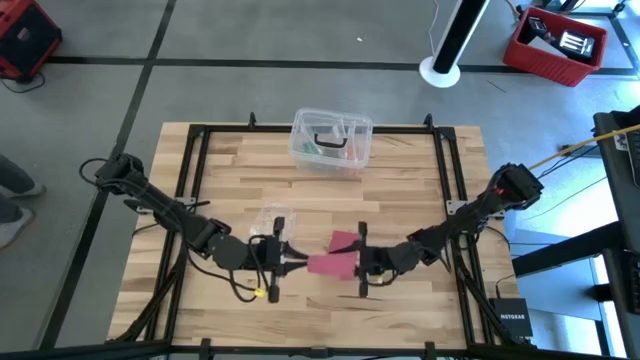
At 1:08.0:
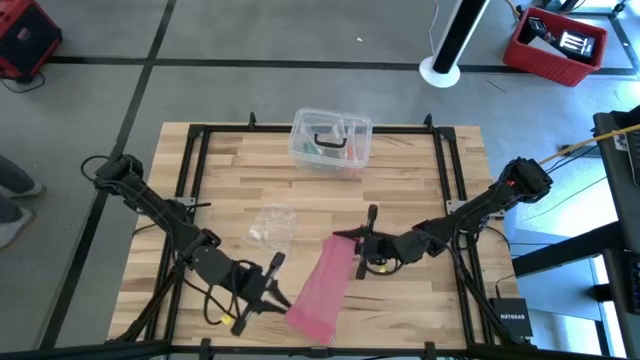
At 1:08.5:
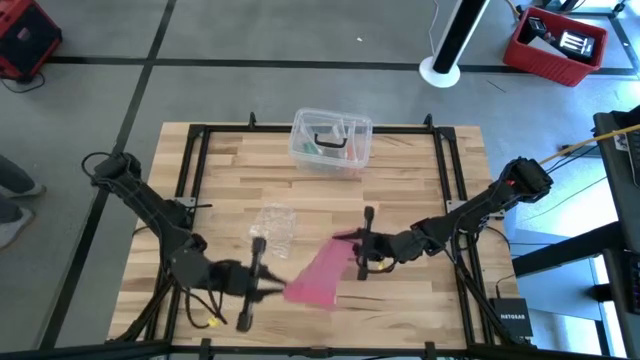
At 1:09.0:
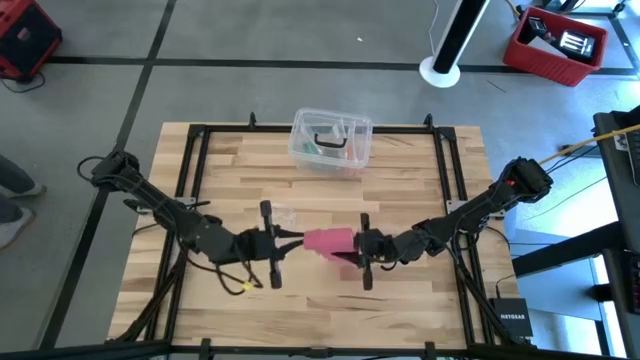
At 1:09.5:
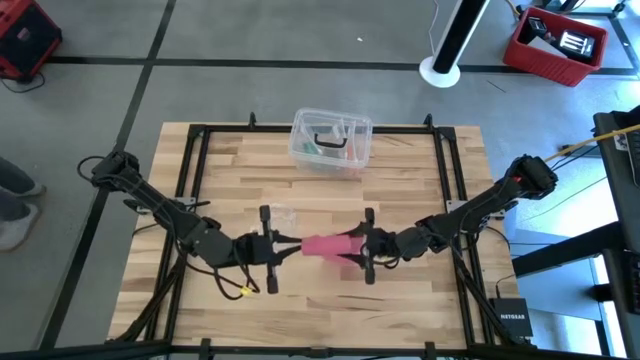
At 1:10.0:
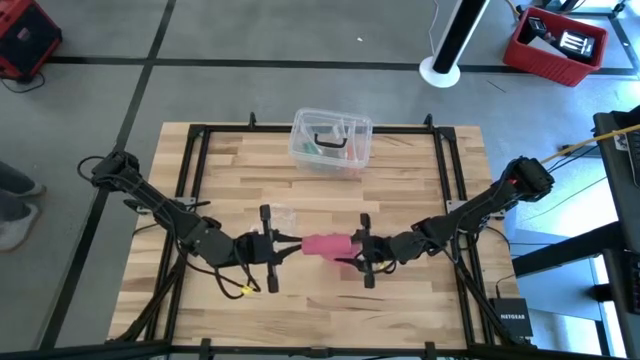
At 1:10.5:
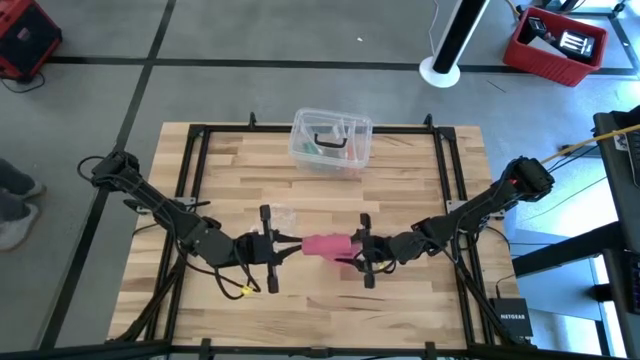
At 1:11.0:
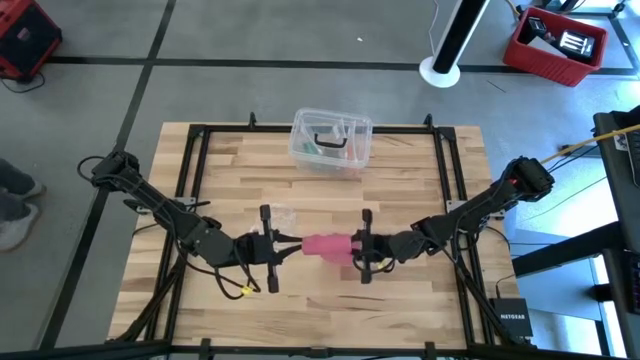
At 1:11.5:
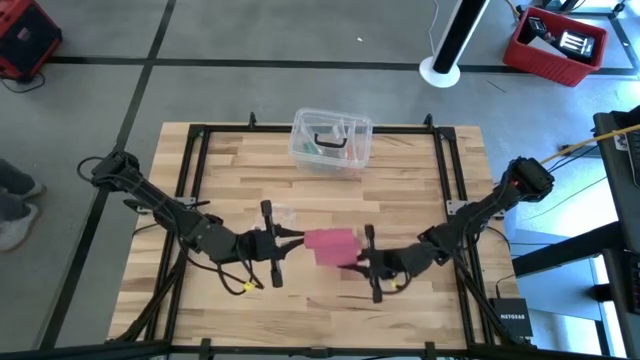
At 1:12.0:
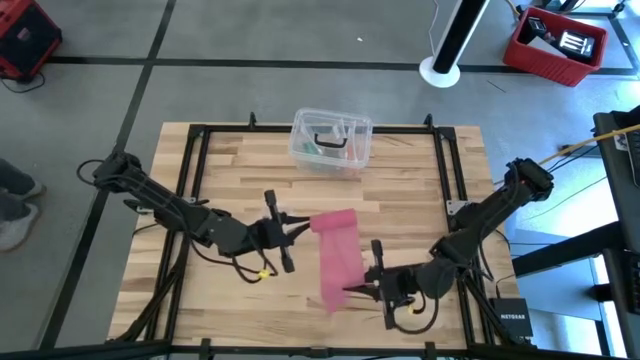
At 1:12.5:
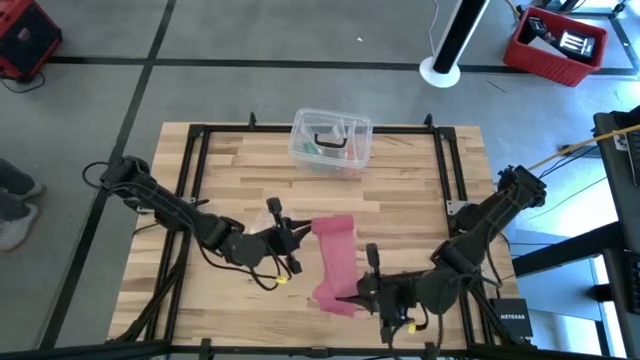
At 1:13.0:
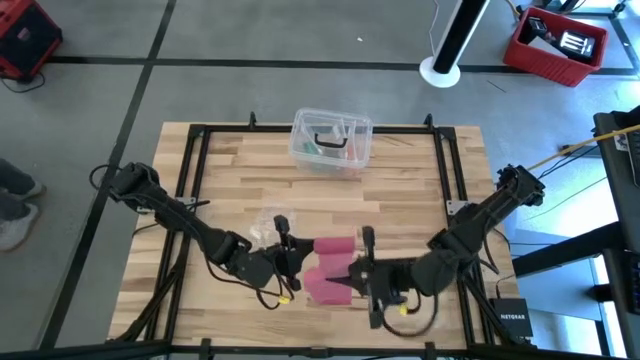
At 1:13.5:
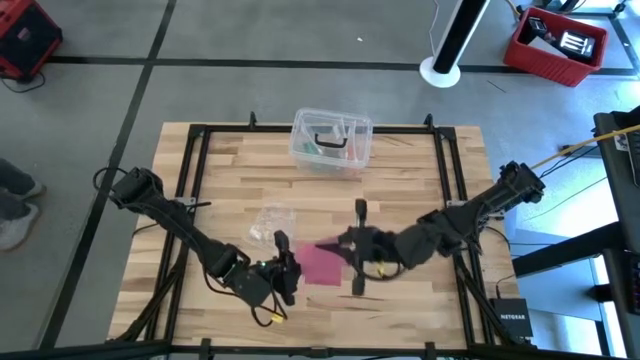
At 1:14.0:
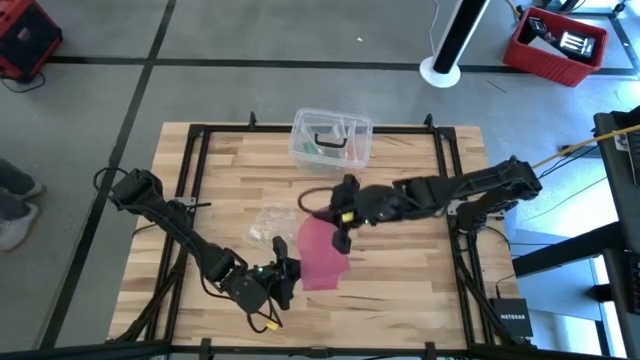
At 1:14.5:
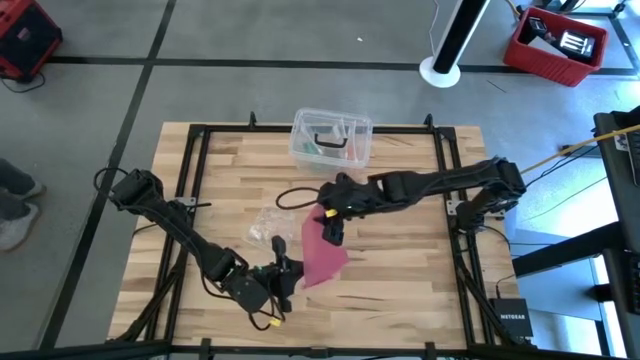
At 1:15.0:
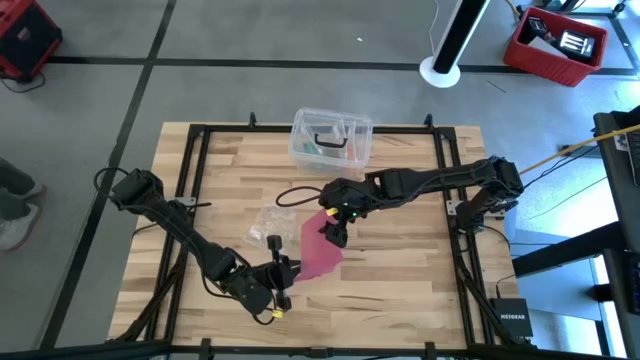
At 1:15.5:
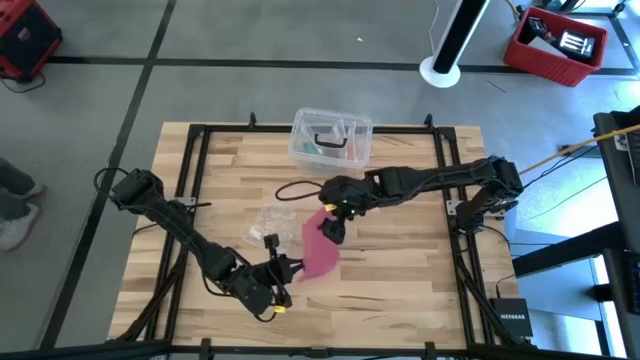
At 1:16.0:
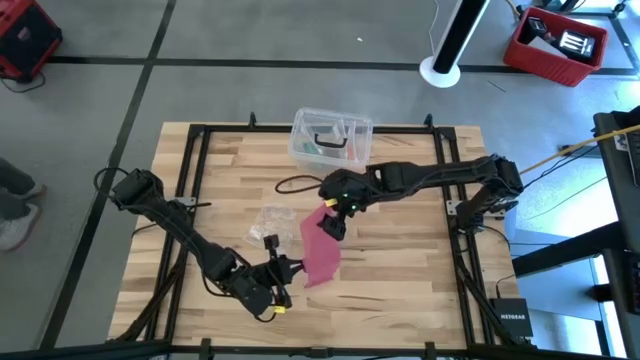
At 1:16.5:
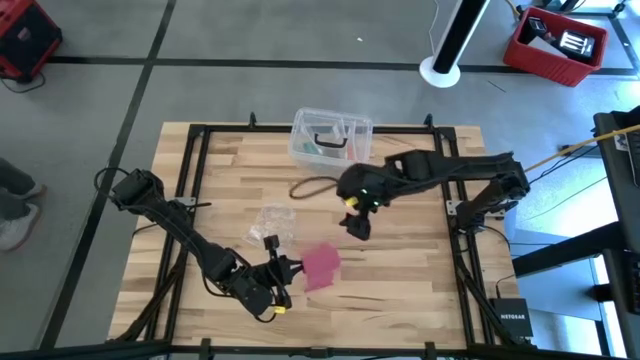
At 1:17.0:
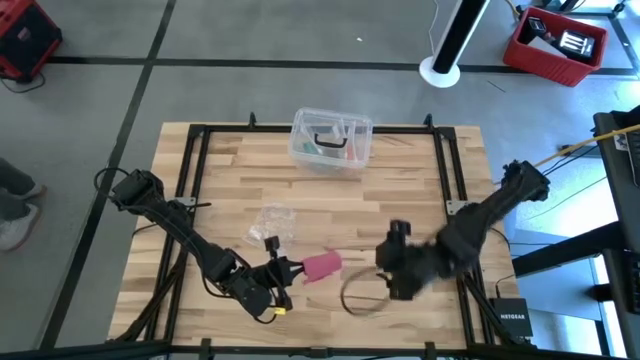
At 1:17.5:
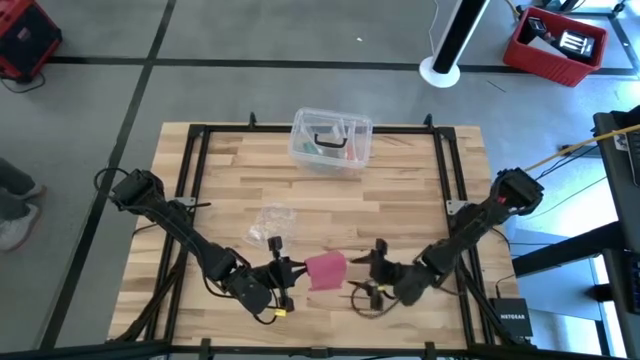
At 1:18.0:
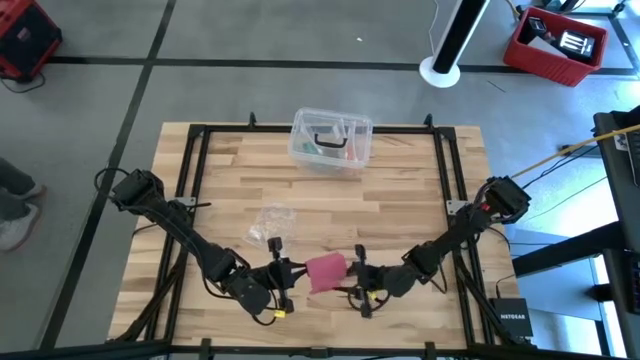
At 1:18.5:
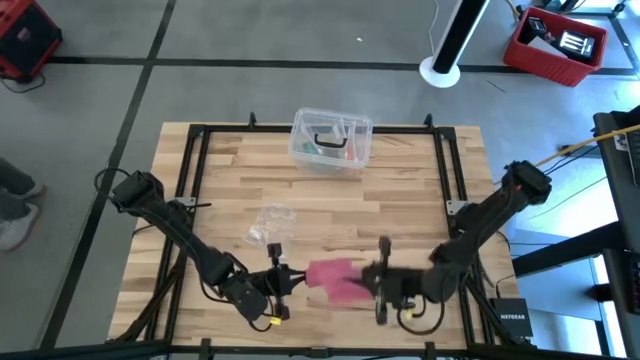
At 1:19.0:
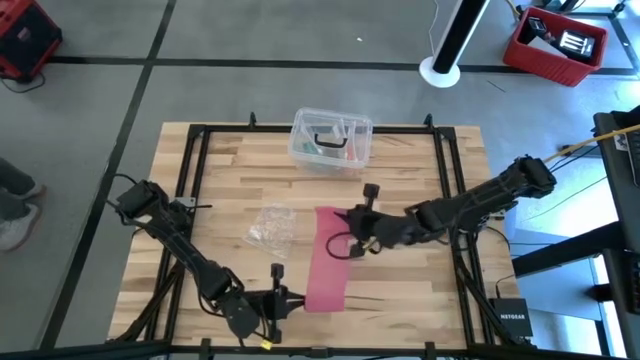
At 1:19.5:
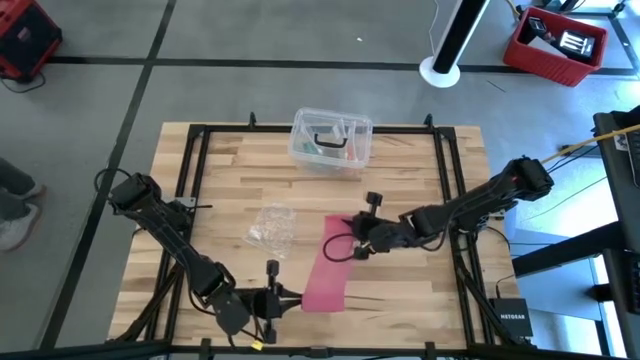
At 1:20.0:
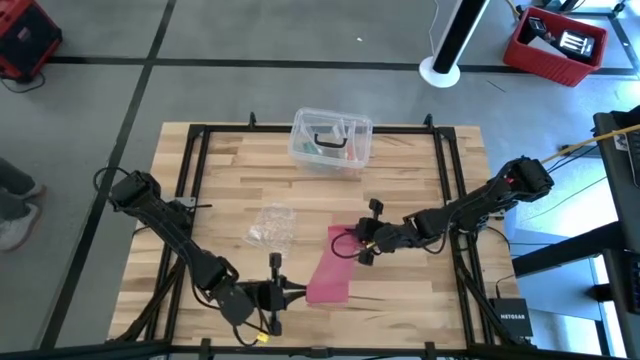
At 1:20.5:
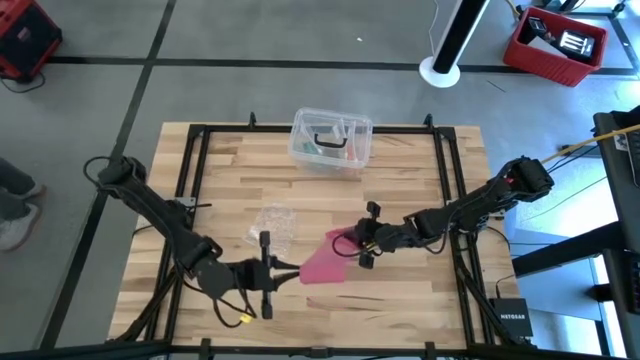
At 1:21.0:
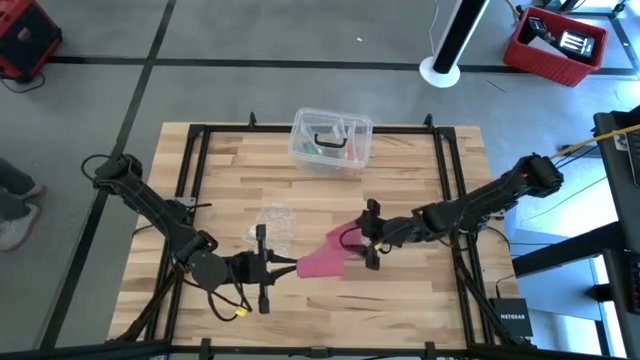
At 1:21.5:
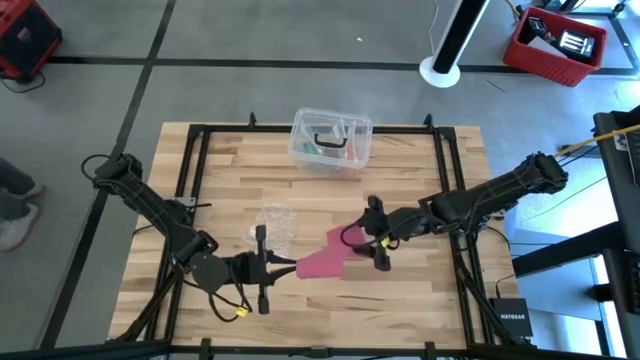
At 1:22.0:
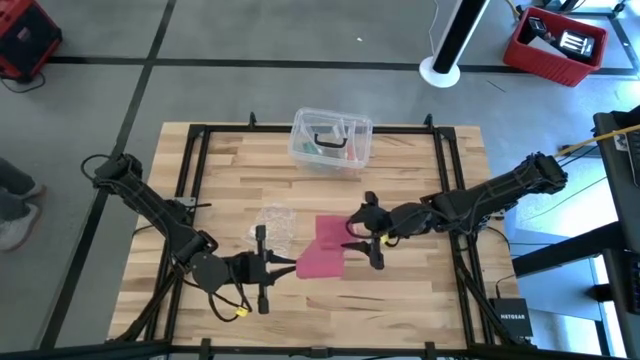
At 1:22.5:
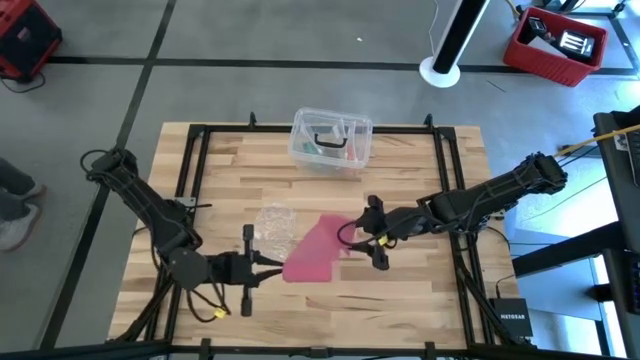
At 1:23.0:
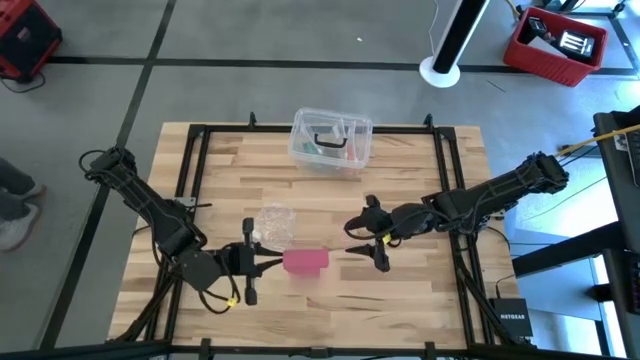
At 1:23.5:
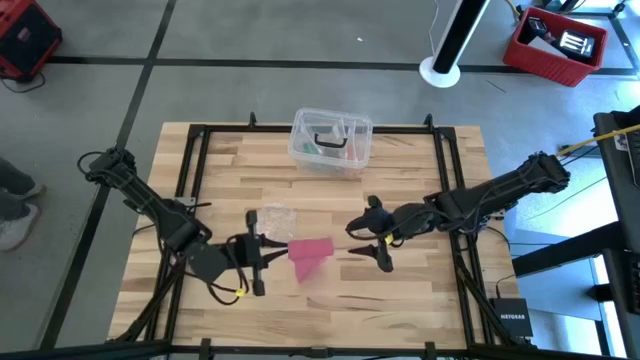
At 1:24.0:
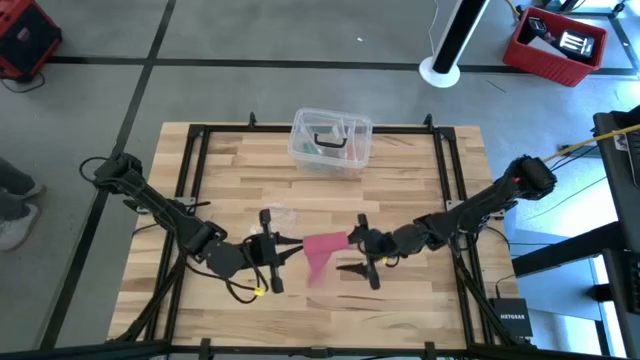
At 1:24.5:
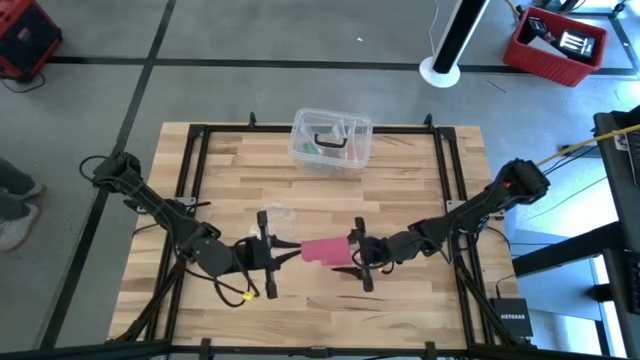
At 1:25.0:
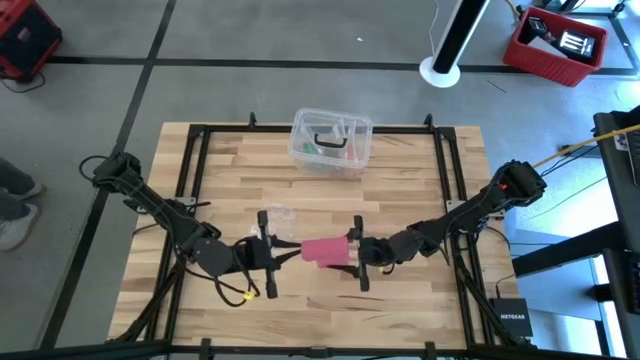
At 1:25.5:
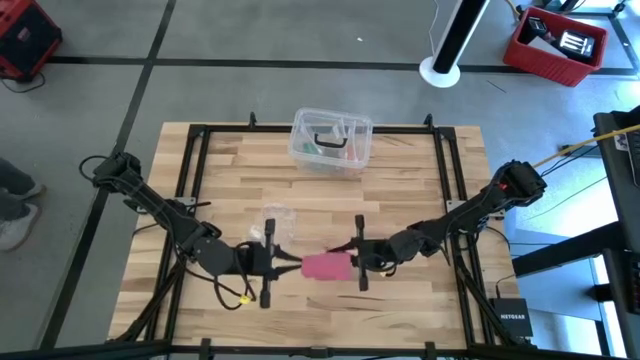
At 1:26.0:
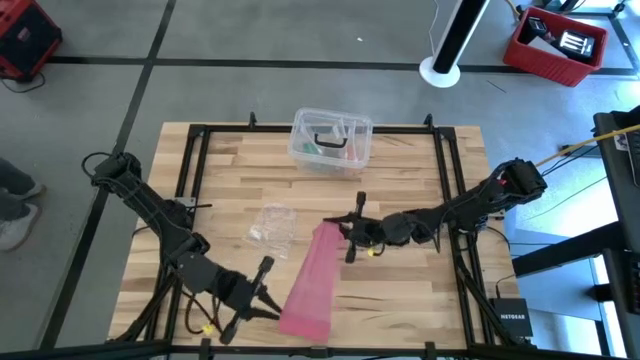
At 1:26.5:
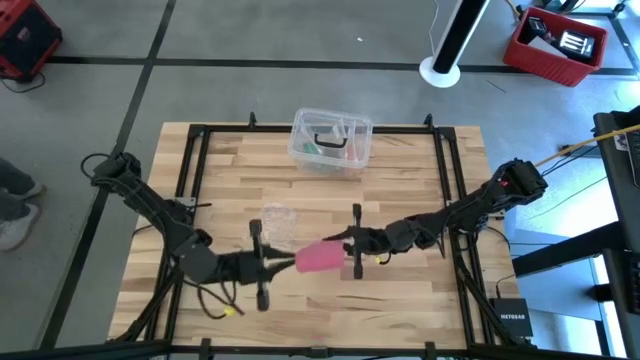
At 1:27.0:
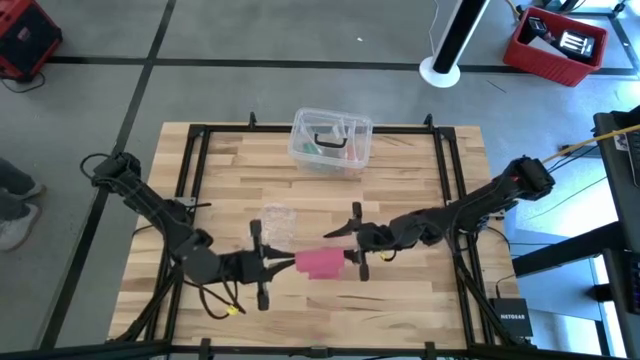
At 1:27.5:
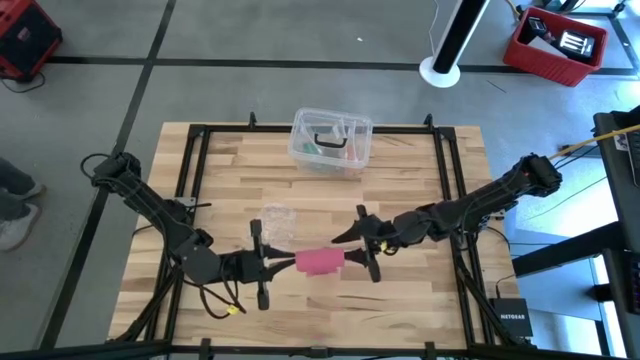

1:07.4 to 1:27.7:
Task: Roll bandage
Roll the pink bandage

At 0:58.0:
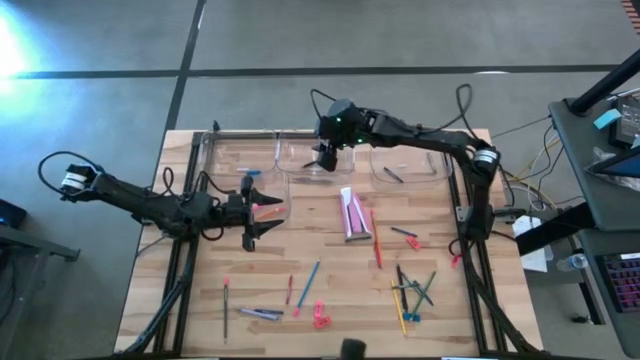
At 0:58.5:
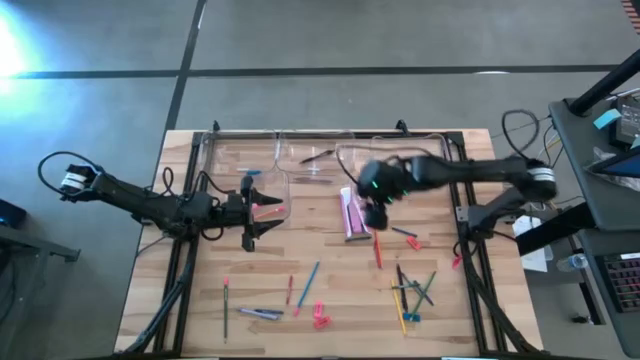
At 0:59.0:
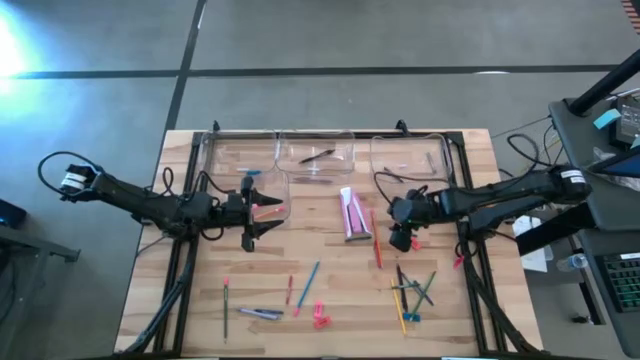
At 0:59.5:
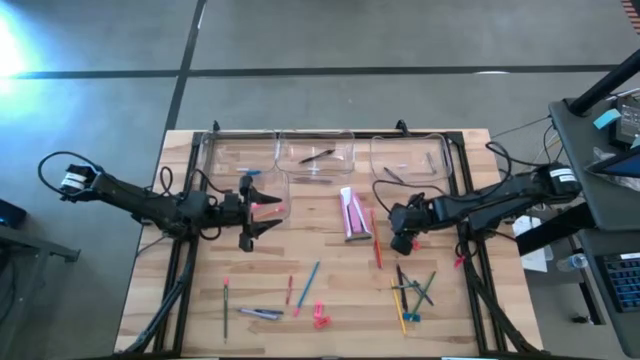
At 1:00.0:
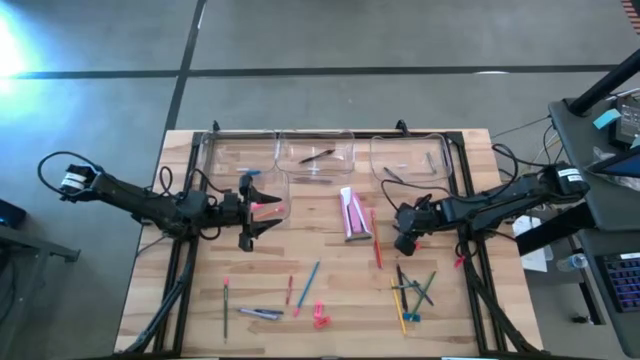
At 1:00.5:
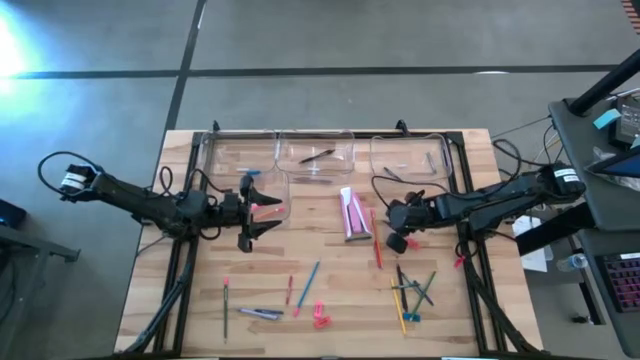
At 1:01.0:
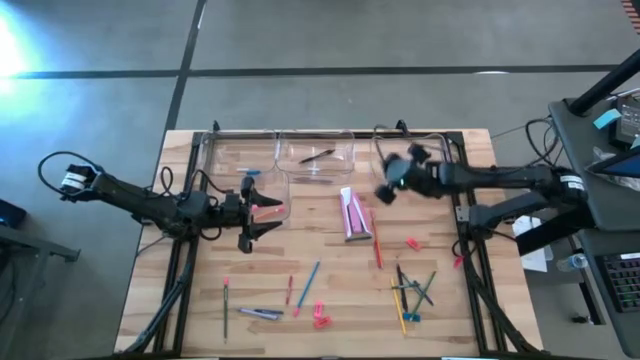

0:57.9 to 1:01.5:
Task: Sort crayons/erasers/pens/pencils in bins
Put the blue crayon into the top right transparent bin
